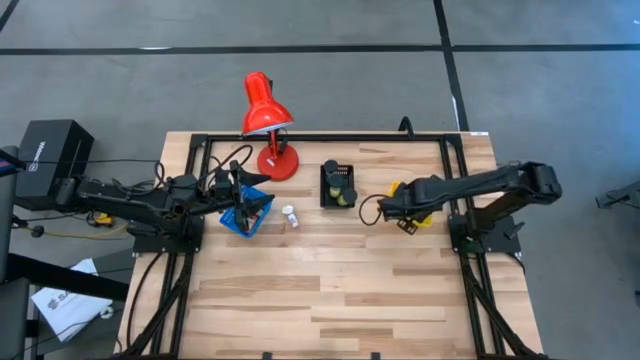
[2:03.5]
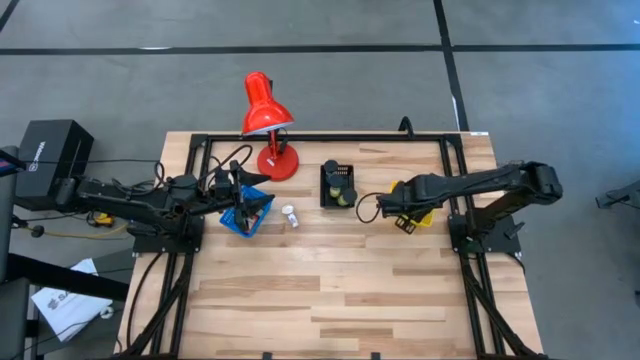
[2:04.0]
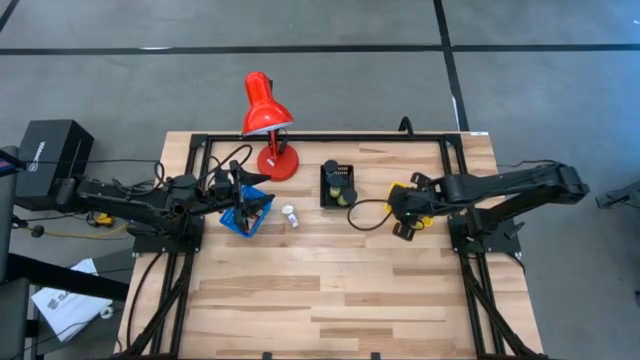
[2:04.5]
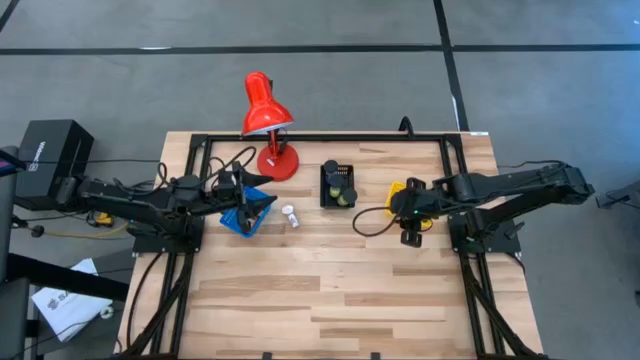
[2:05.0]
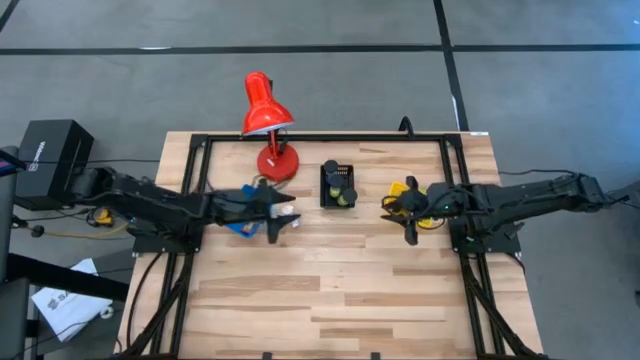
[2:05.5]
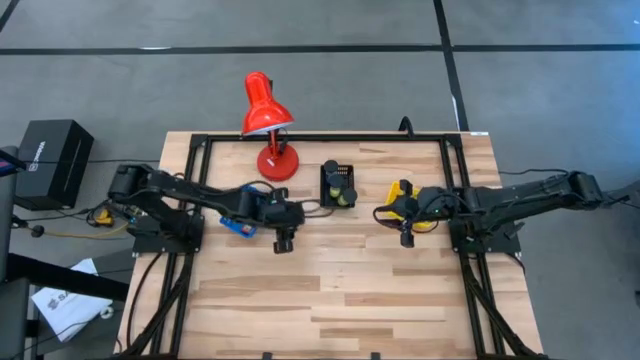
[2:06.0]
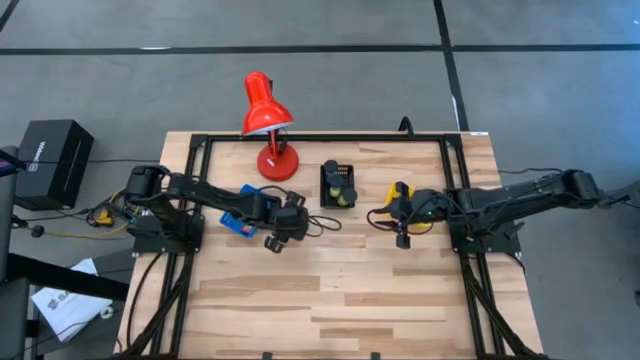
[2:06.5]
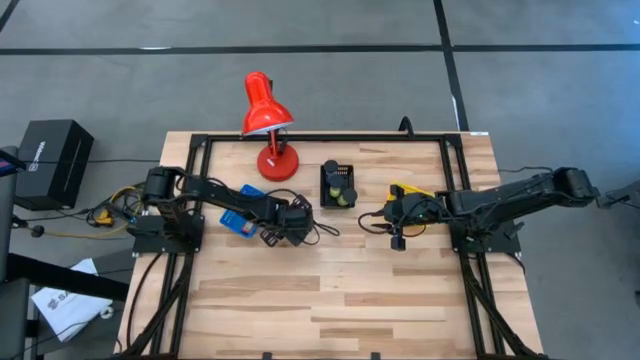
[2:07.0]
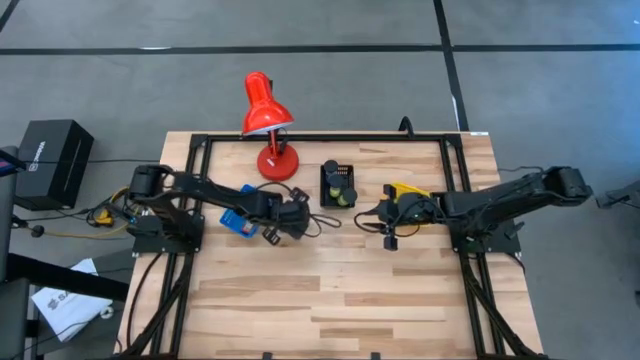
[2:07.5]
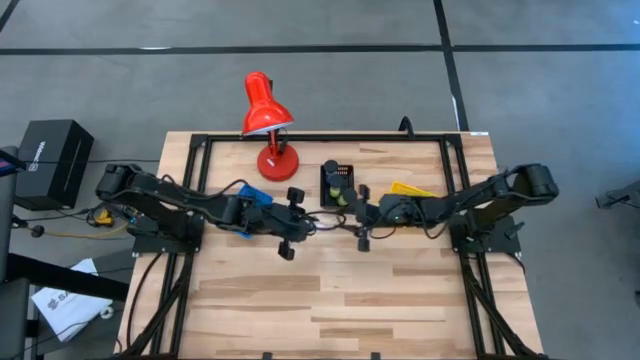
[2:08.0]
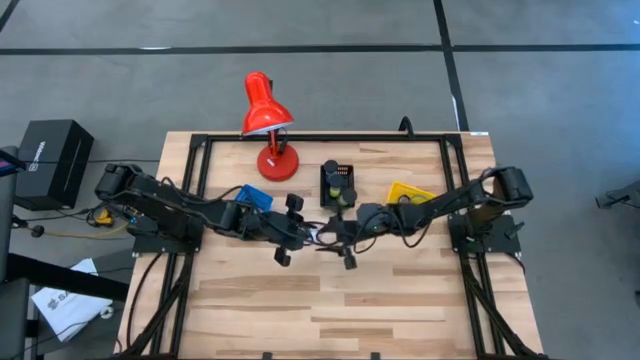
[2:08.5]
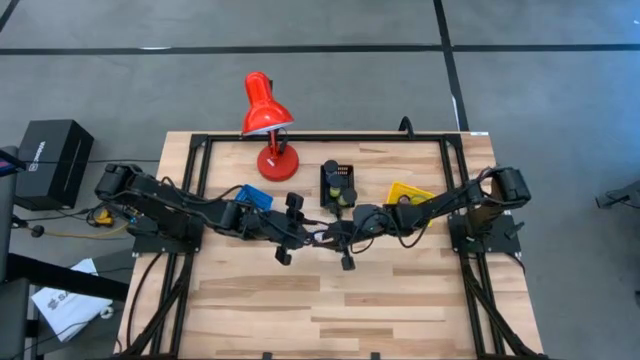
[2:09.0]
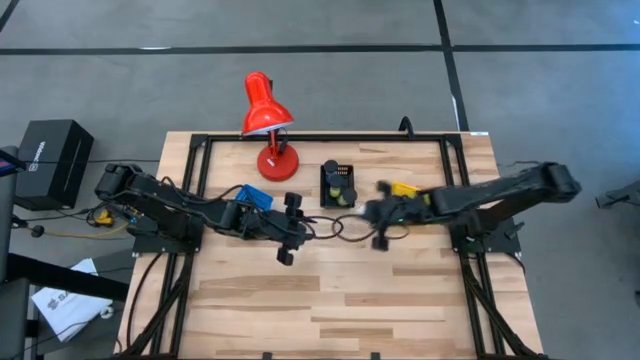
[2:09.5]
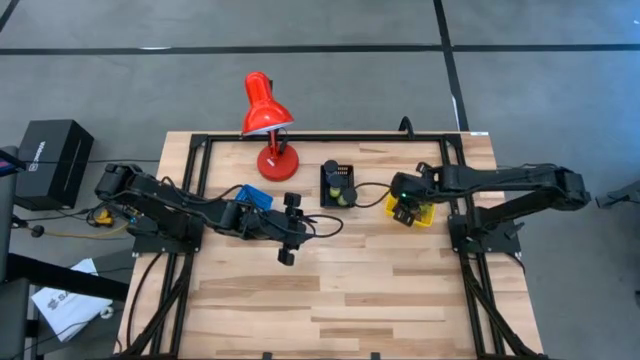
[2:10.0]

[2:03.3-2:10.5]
Task: Pick & Place Office items
Put the white watch into the yellow basket

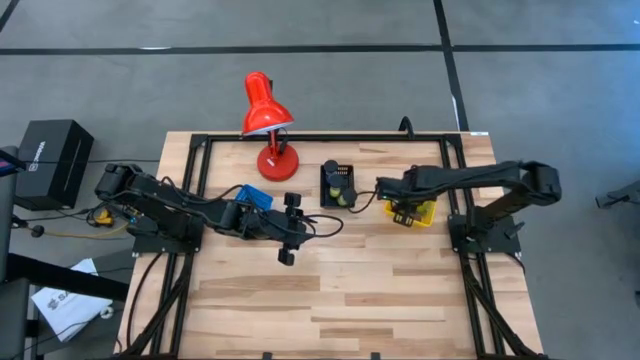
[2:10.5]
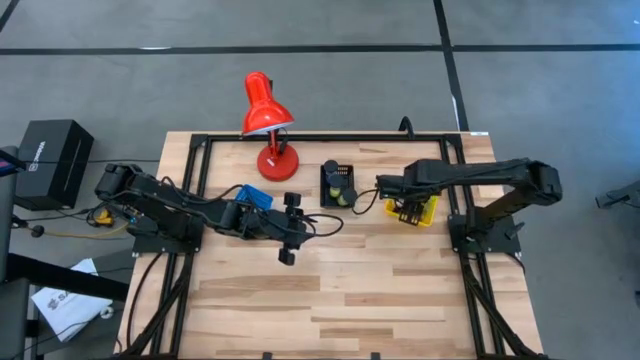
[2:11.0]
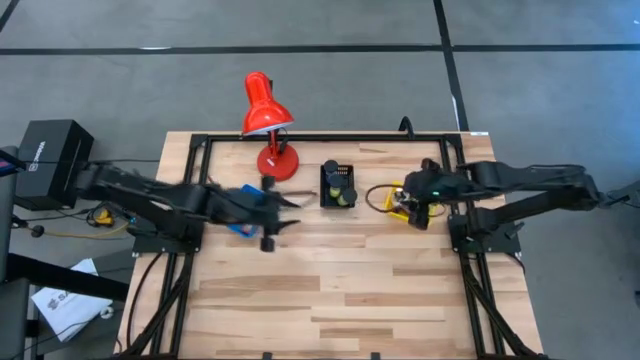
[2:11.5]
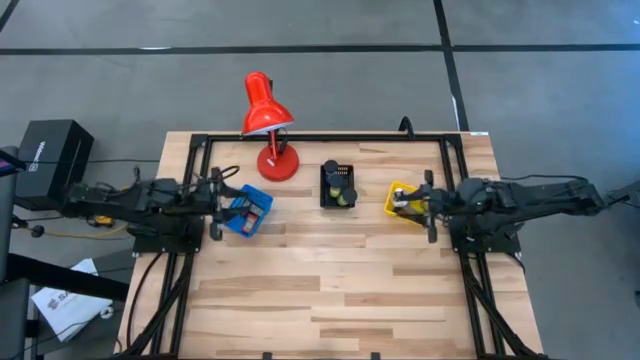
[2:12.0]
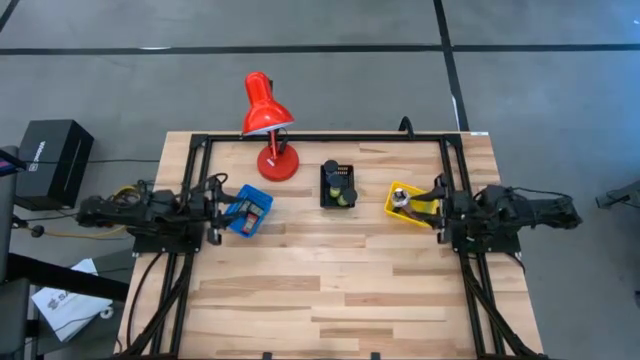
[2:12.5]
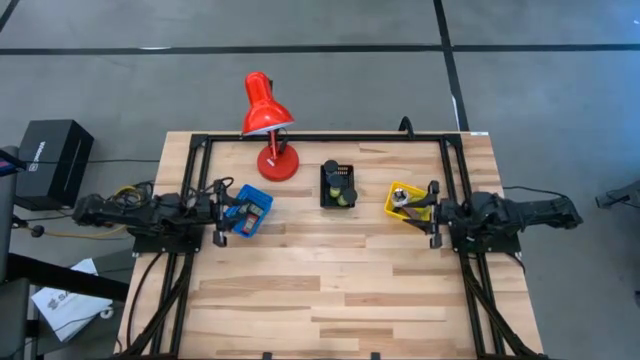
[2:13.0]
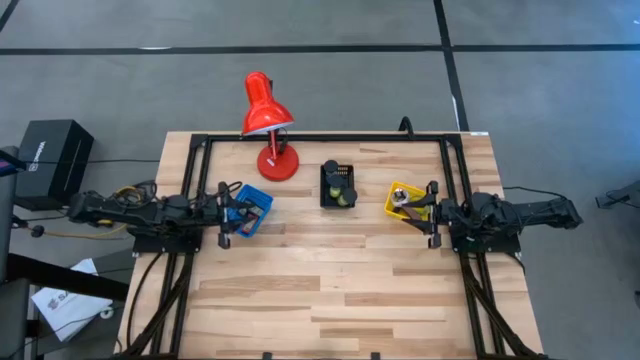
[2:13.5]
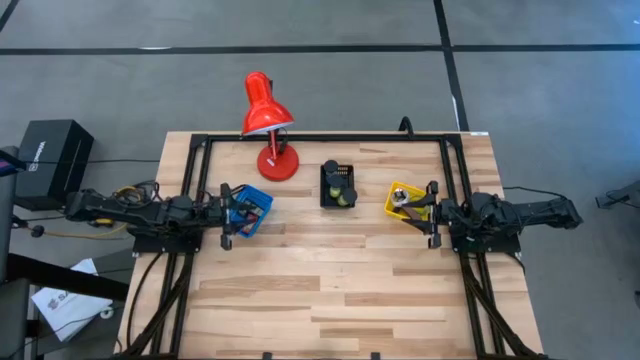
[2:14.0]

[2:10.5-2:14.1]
Return to Home Position

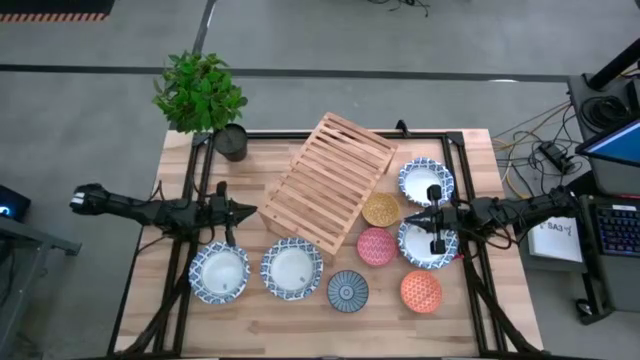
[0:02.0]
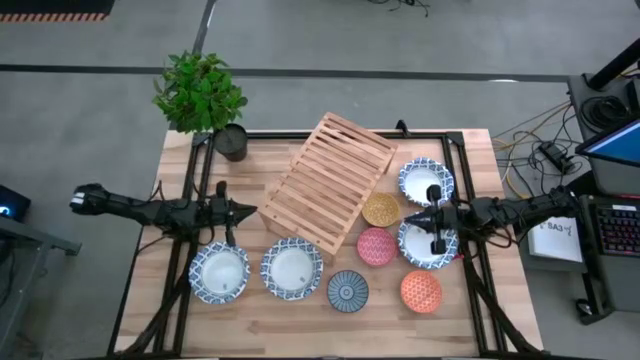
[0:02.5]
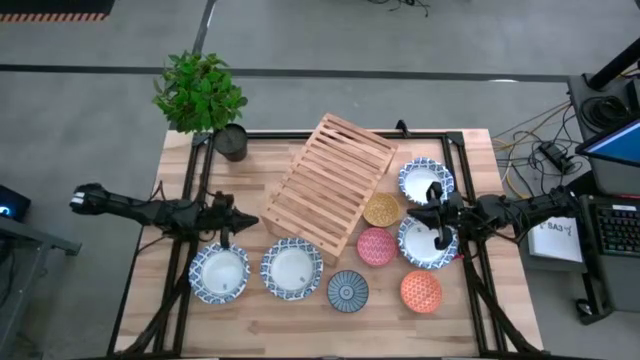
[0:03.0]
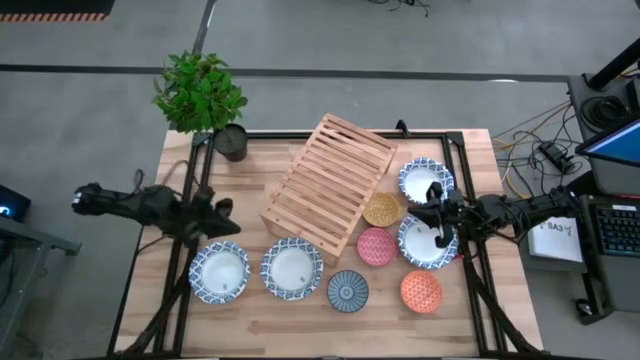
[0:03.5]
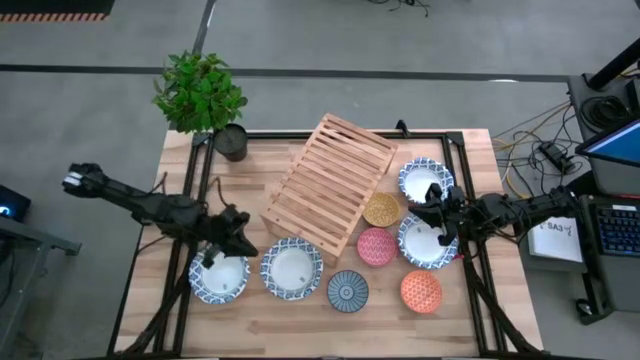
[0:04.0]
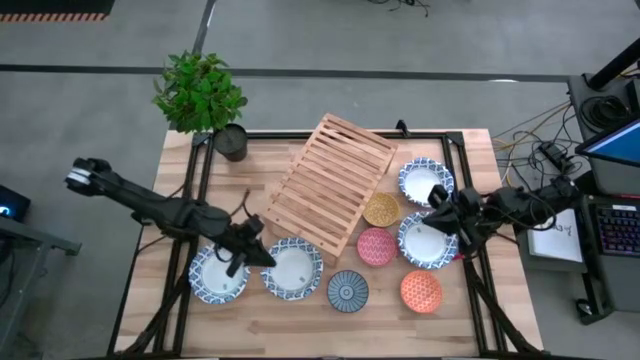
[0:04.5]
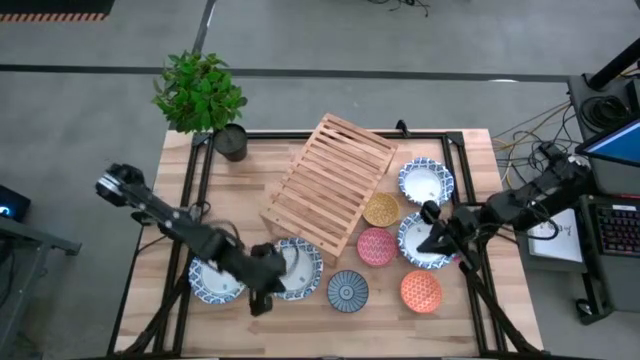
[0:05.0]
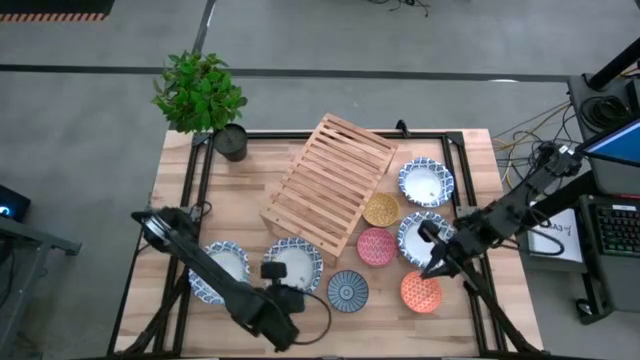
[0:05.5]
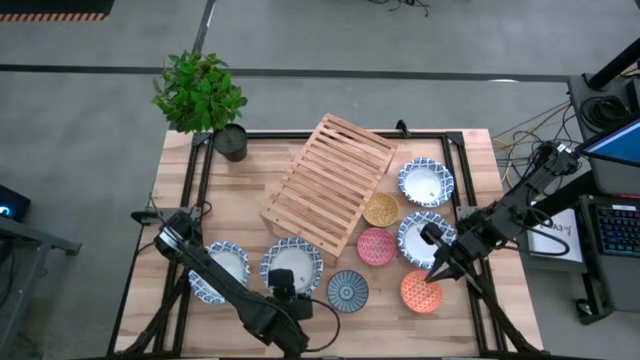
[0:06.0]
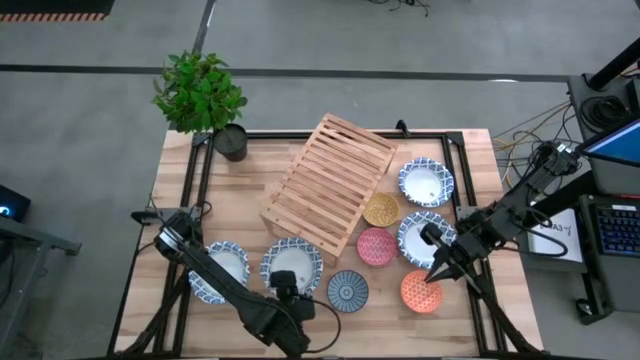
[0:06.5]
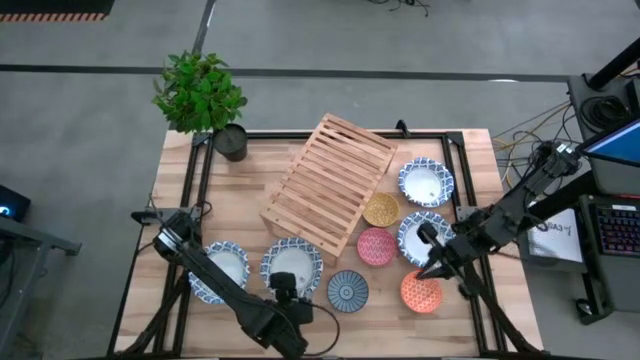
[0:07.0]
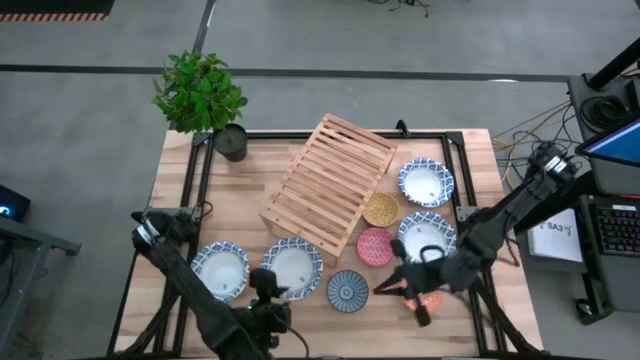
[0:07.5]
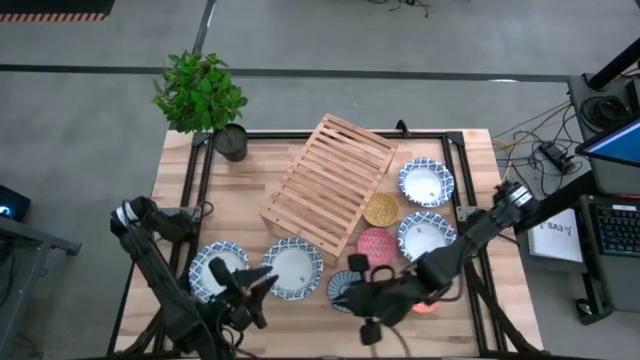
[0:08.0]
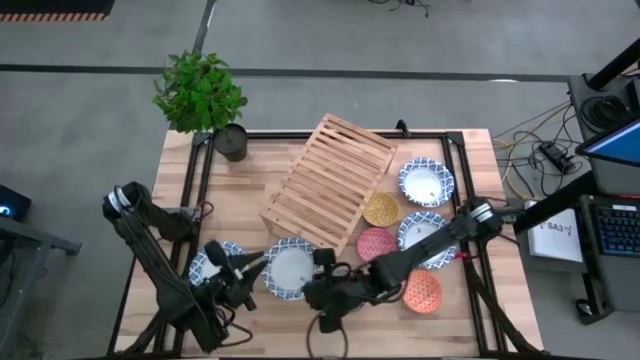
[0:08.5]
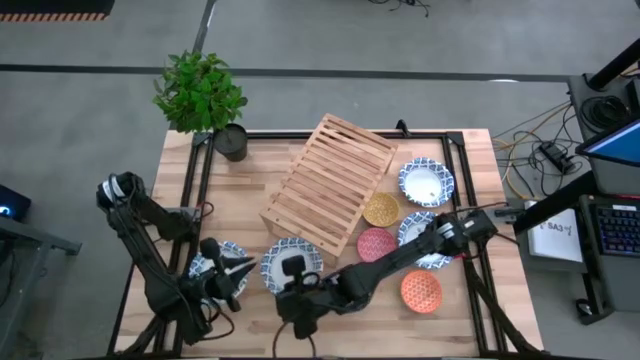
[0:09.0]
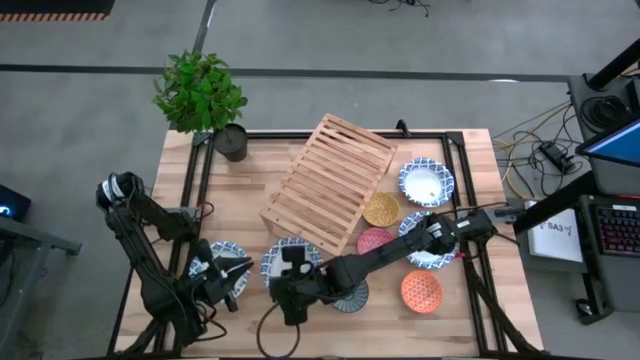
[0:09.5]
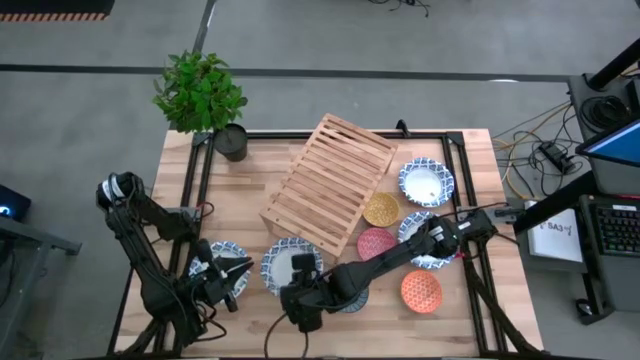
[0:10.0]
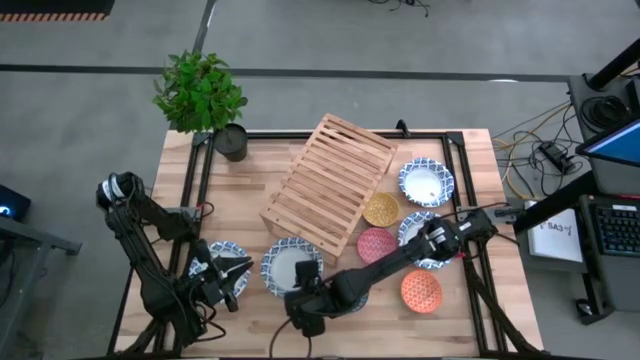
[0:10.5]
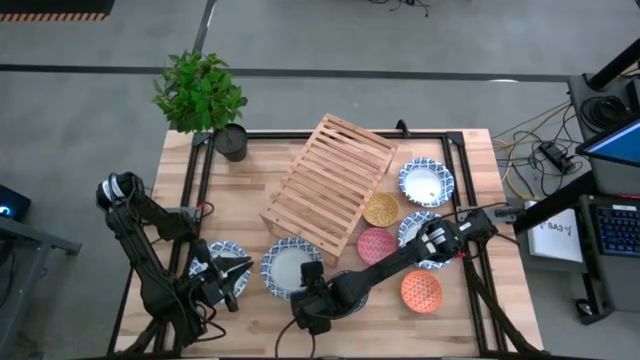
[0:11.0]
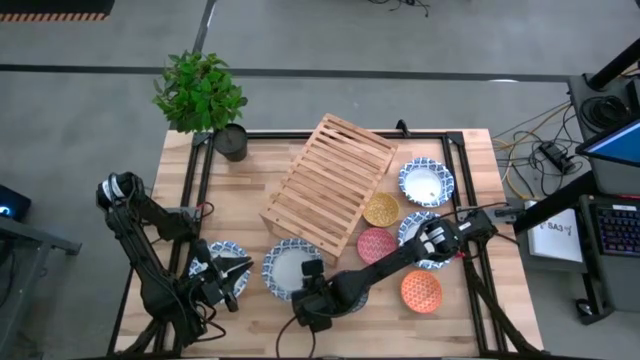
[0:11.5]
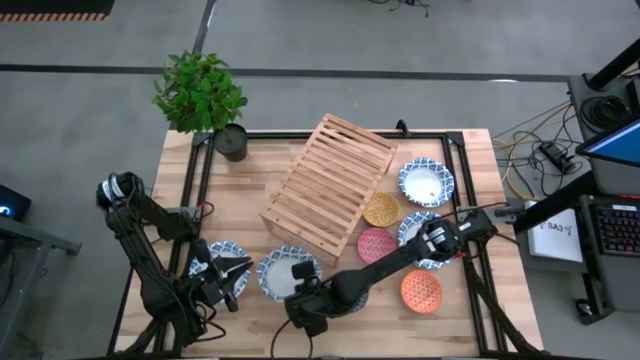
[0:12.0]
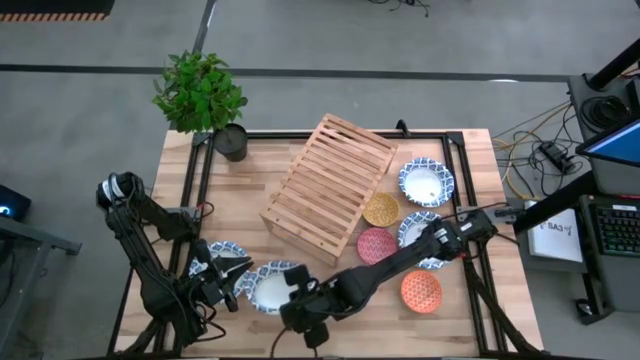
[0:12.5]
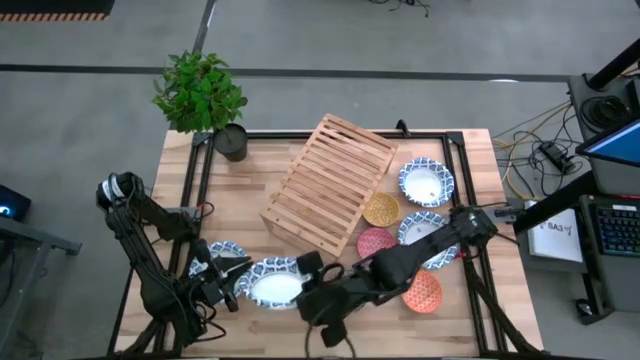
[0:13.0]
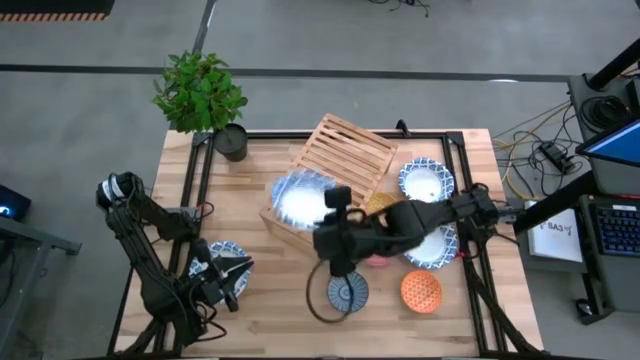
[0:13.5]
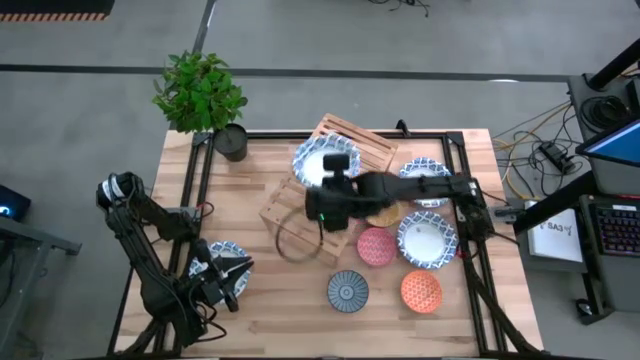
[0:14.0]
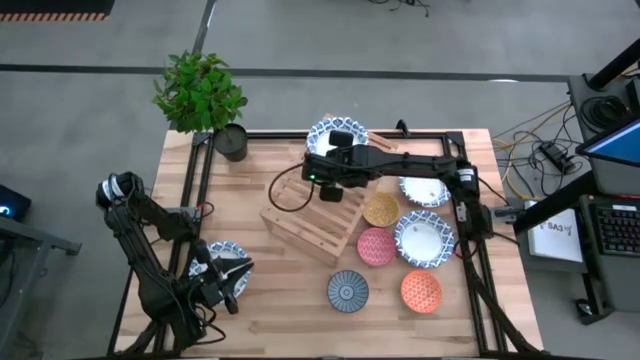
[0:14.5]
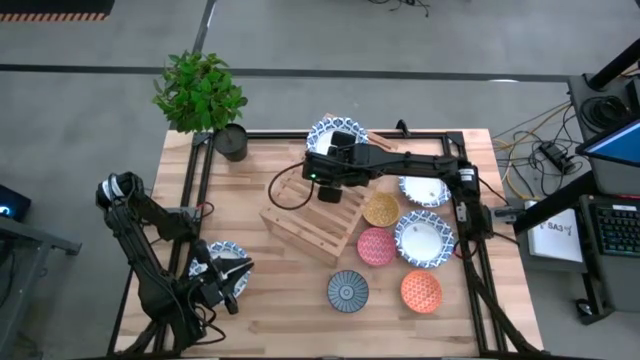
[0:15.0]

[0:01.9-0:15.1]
Task: Place and stack bowls onto a shelf
Put the white patterned bowl on the shelf
